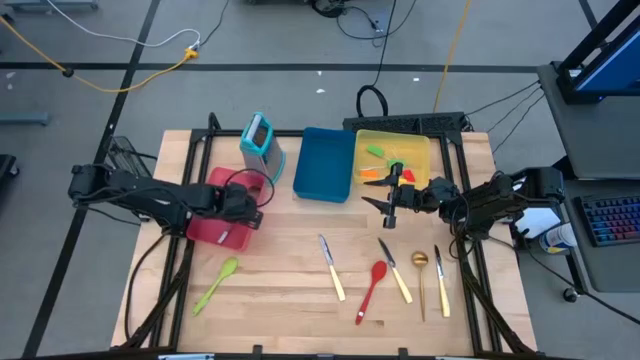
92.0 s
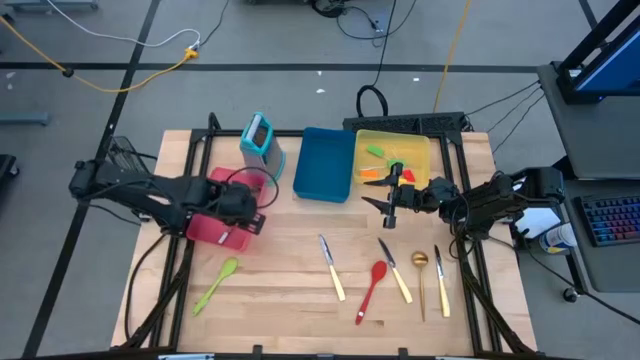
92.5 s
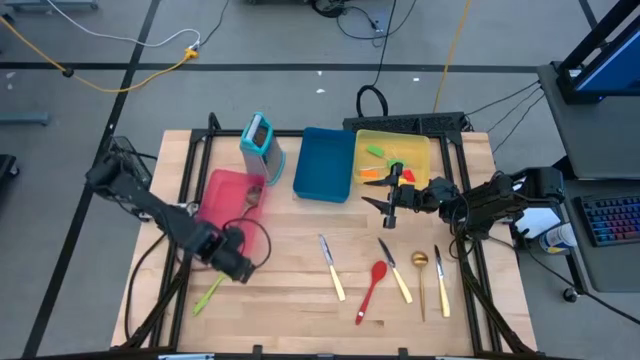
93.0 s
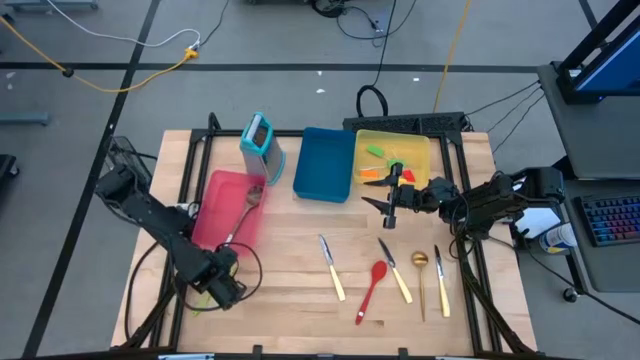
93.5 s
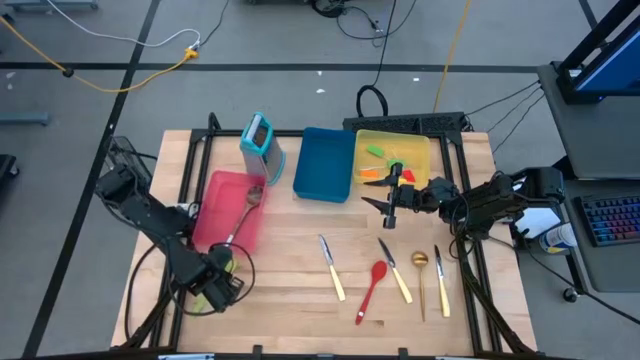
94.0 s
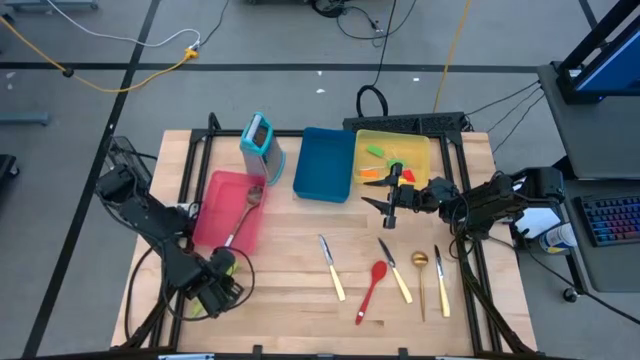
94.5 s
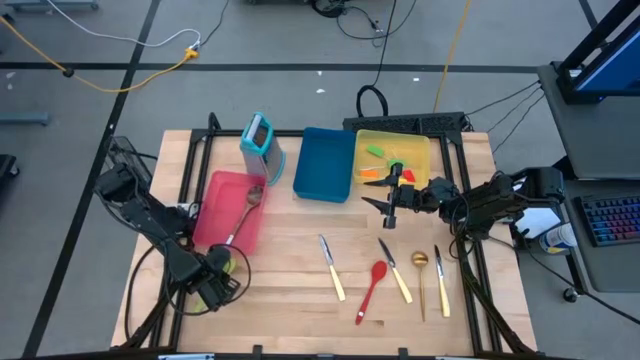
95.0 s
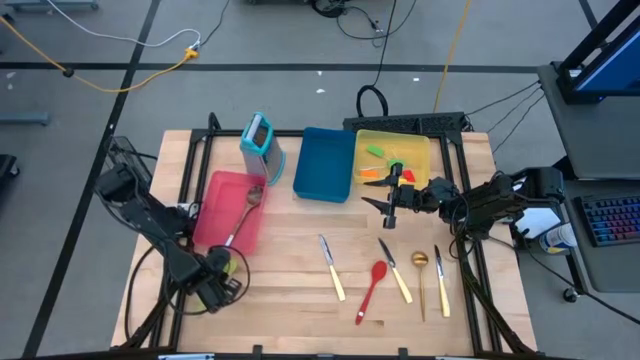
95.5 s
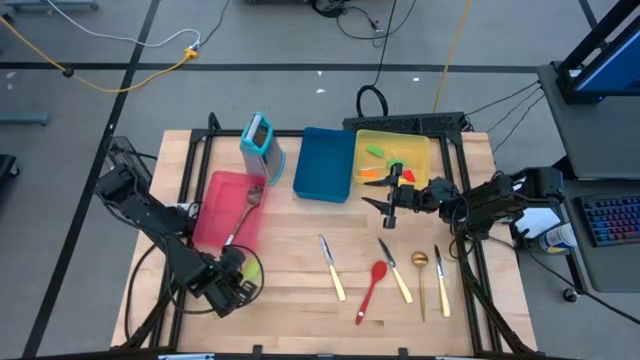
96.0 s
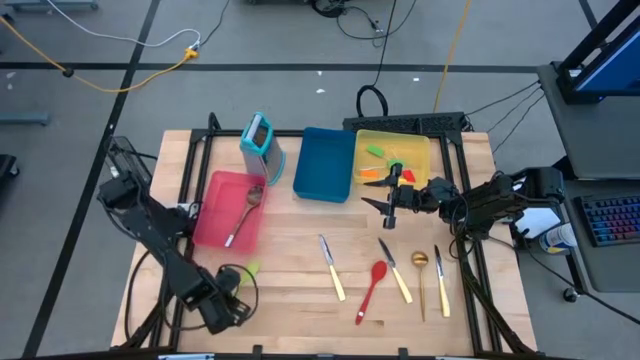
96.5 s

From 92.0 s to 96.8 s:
Task: Pick & Place Kitchen Items
Put the green serving spoon into the pink bin

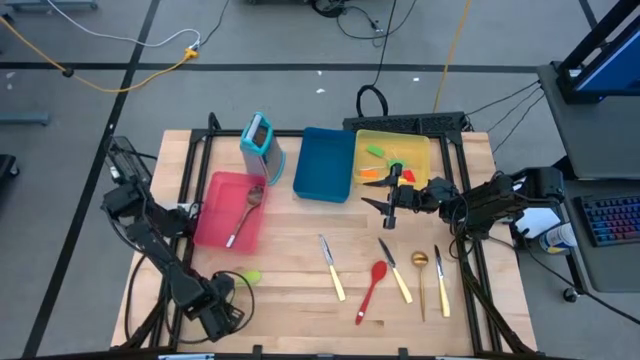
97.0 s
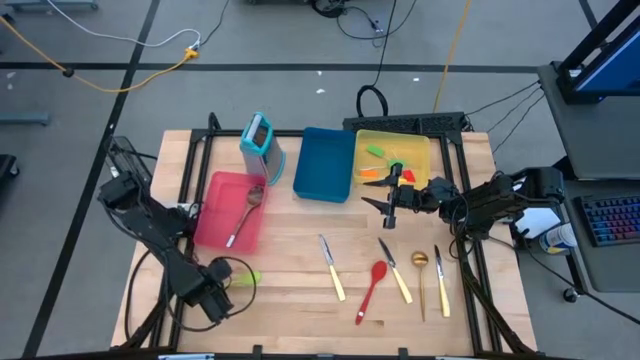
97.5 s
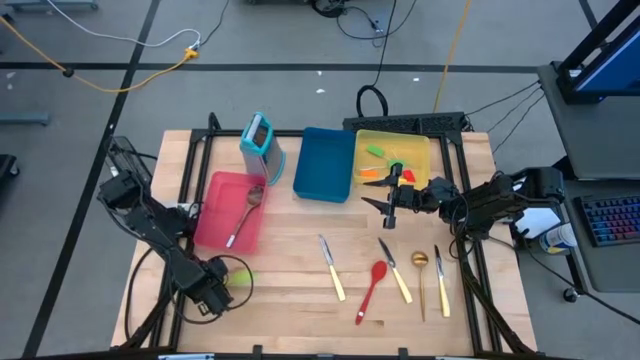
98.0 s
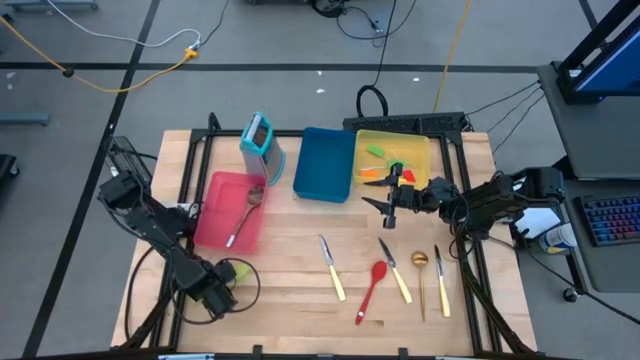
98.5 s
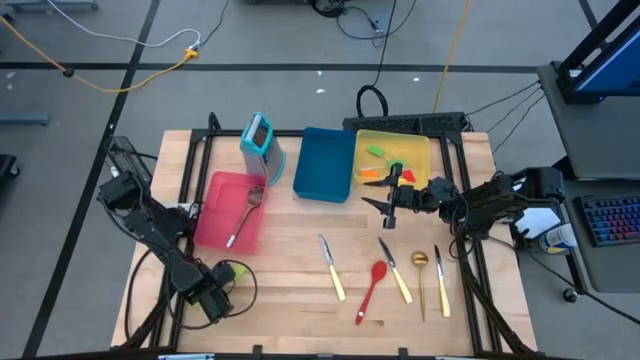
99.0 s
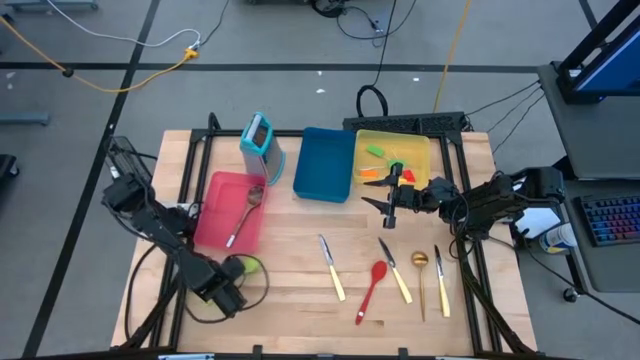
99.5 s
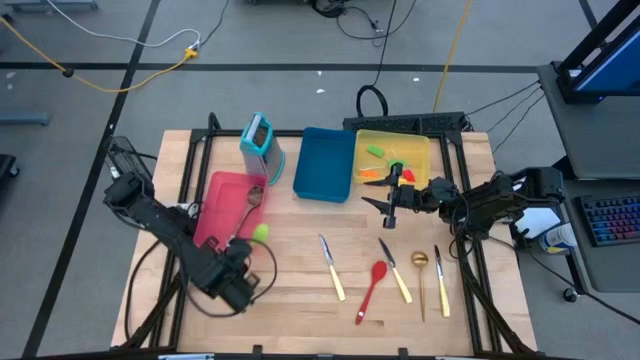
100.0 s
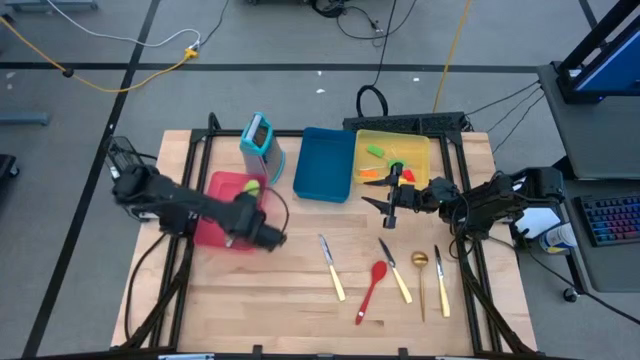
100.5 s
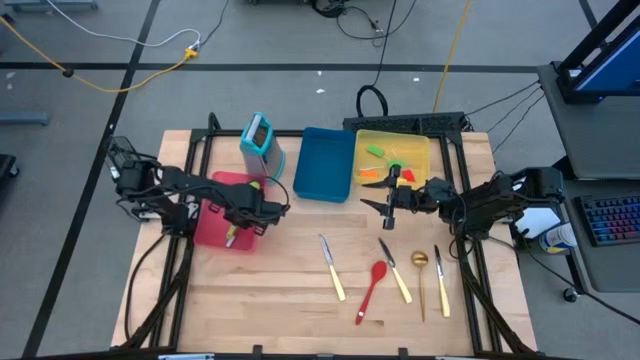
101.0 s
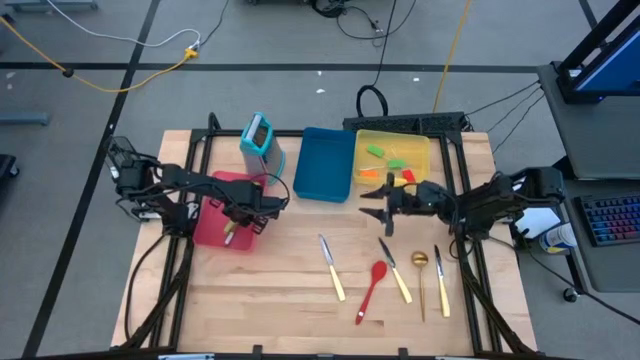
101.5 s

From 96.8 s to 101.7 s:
Put the green serving spoon into the pink bin

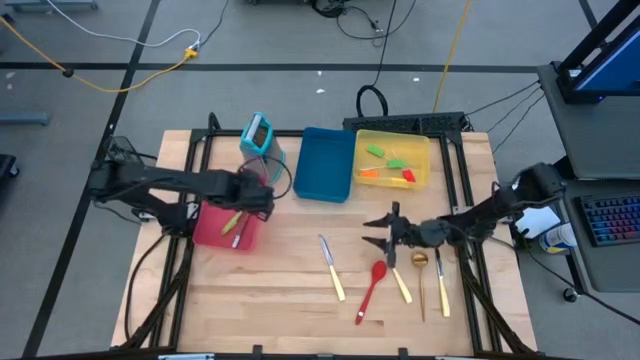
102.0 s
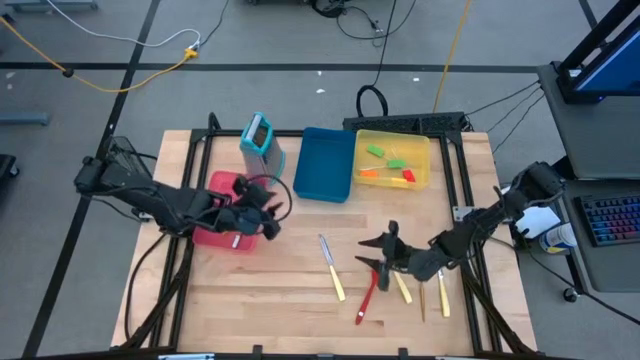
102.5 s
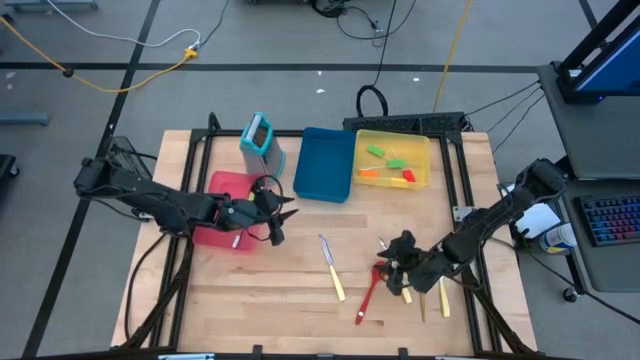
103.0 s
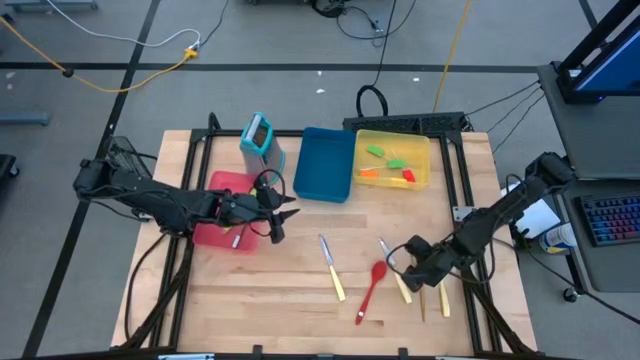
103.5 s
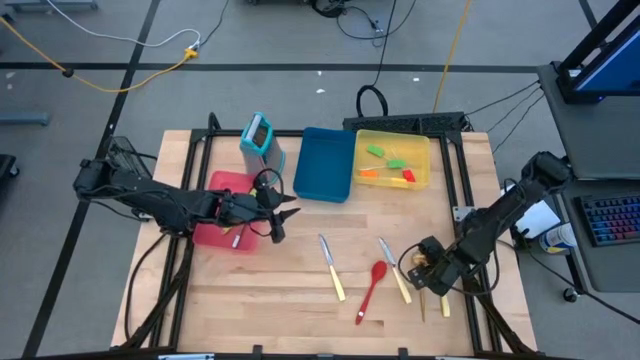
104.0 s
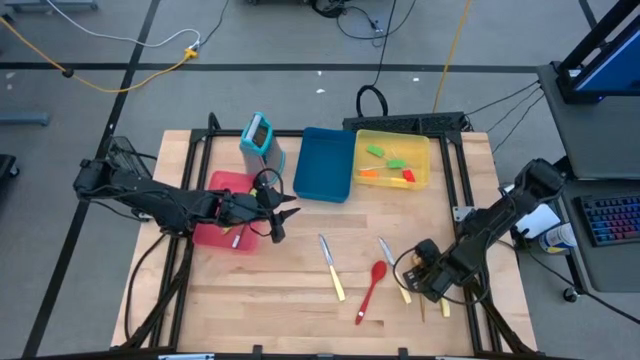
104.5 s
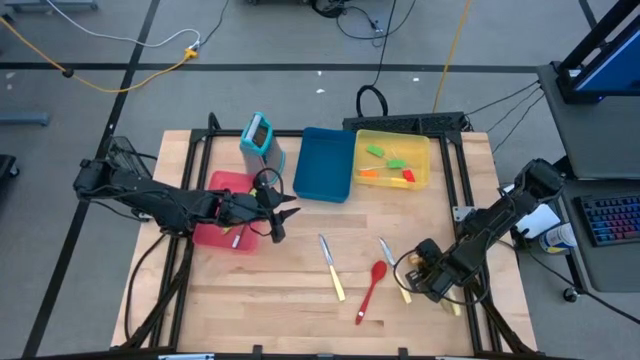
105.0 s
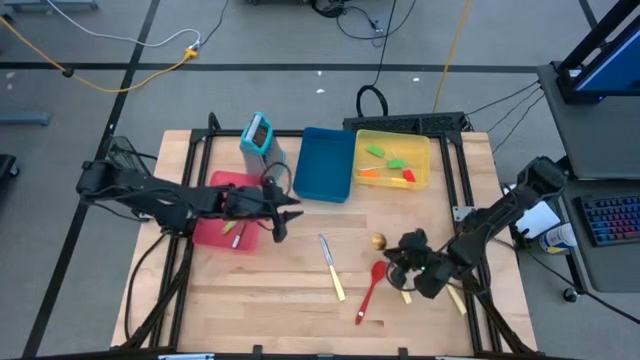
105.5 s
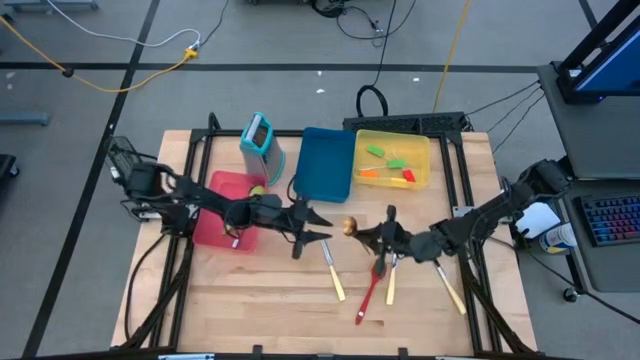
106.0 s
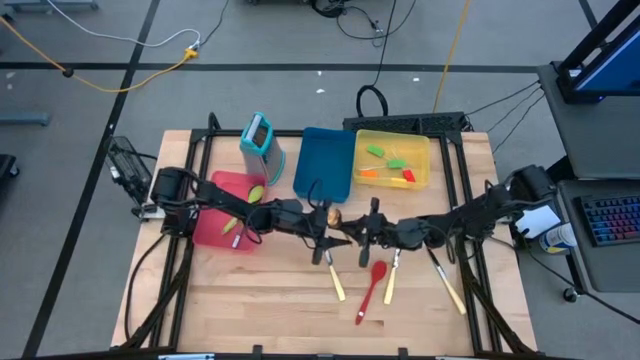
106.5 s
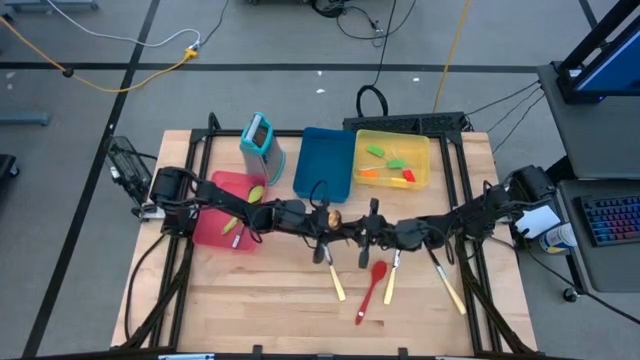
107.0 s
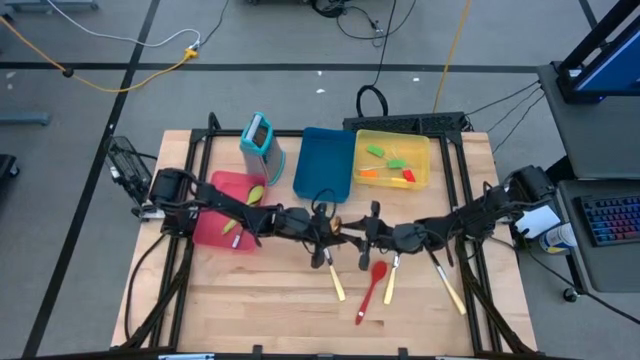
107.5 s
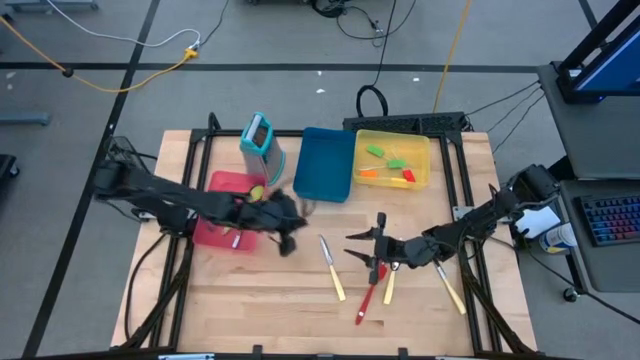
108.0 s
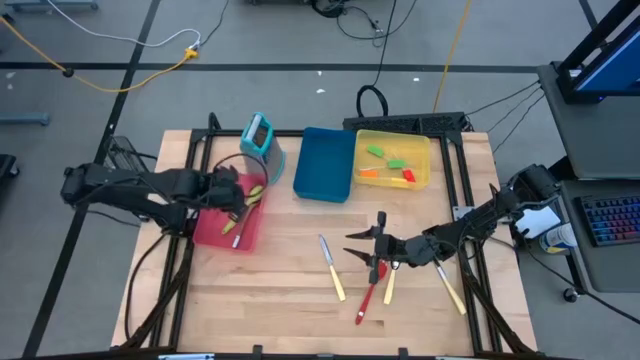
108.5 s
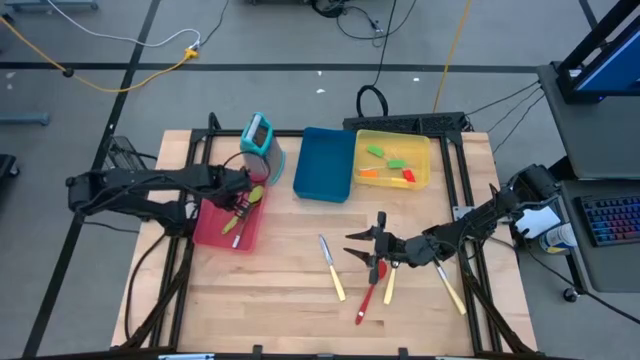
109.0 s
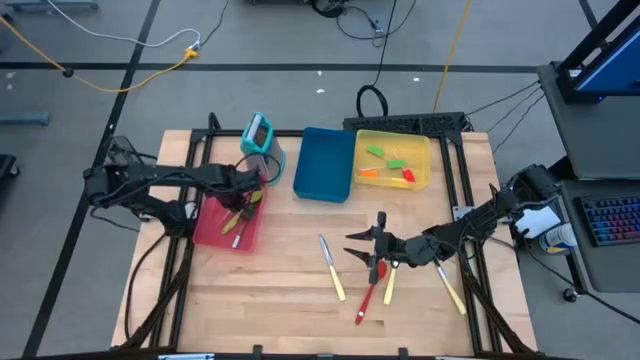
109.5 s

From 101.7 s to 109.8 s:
Put the gold serving spoon into the pink bin

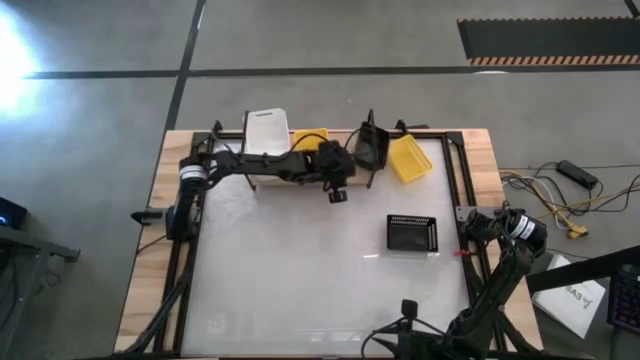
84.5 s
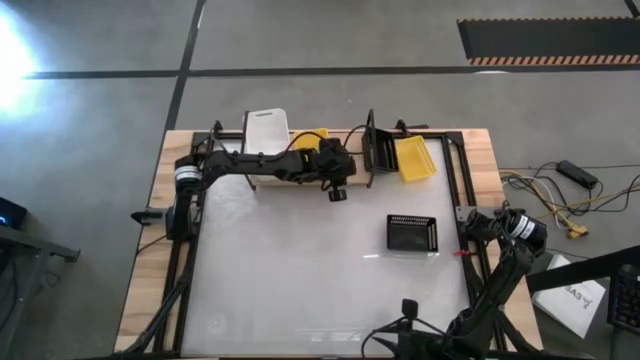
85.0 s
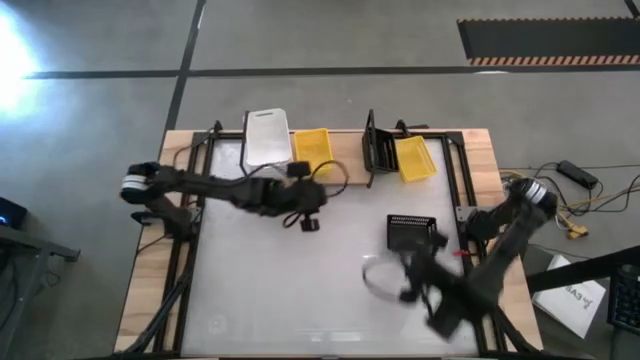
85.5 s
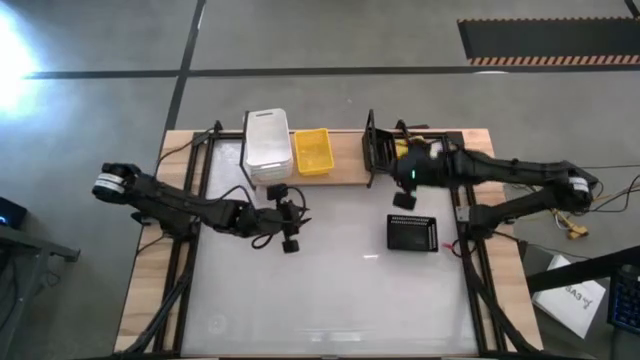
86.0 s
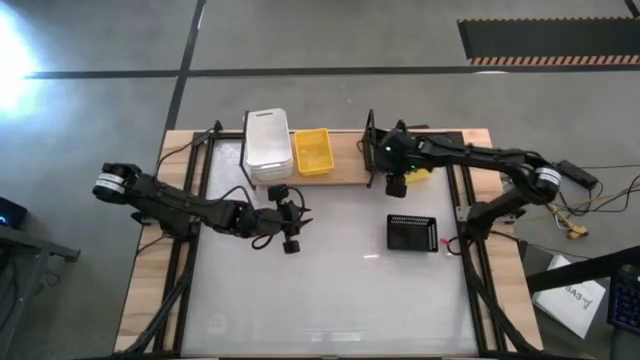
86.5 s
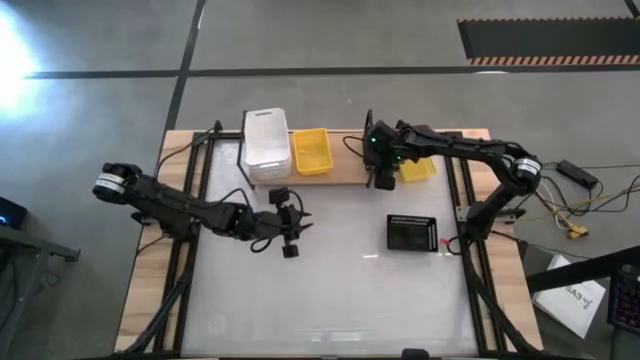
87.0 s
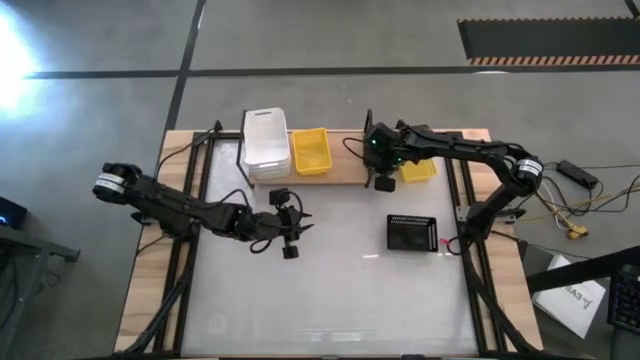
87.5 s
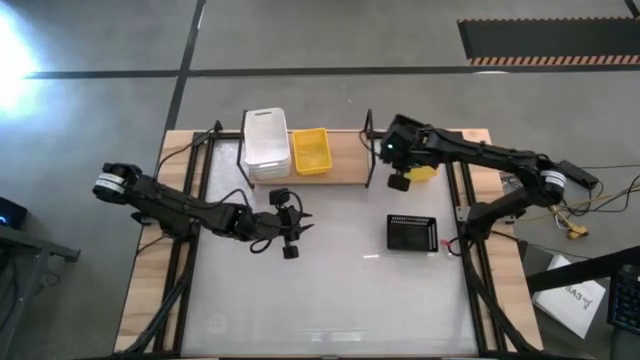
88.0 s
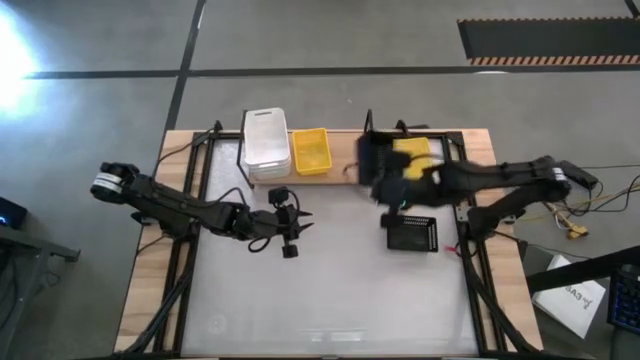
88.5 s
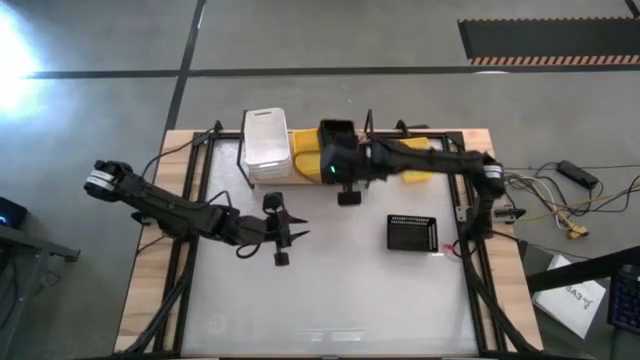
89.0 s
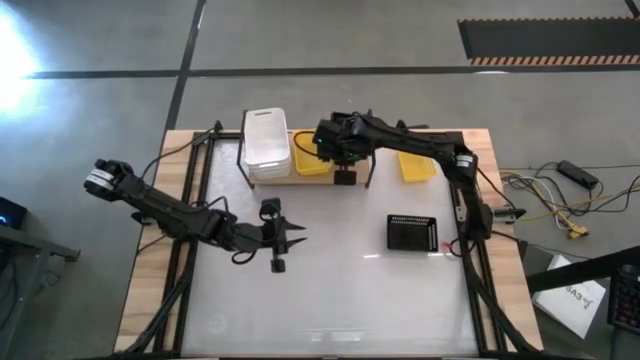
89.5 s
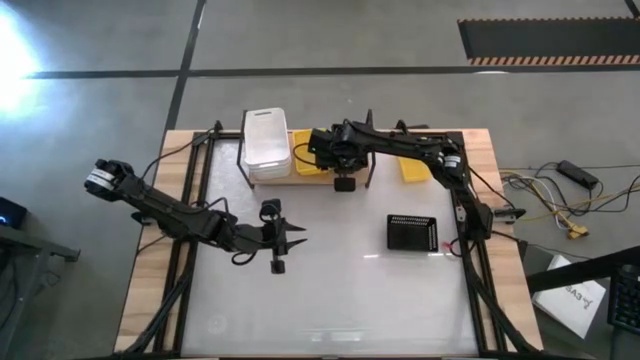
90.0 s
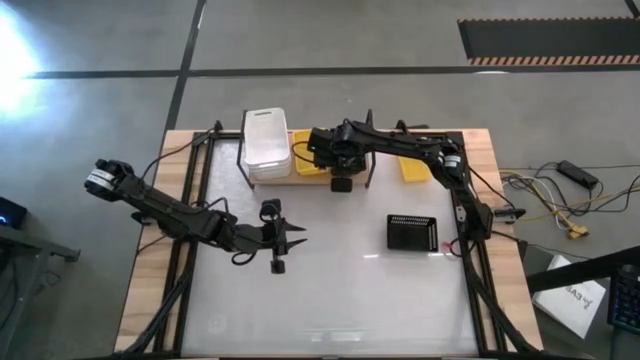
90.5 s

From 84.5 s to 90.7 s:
Task: Stack baskets on shelf by color
Adjust the stacked black bins on the shelf
